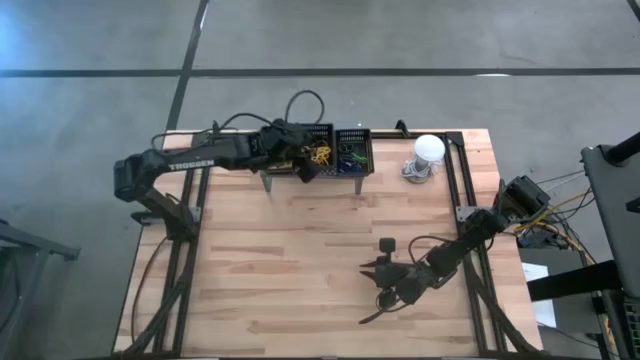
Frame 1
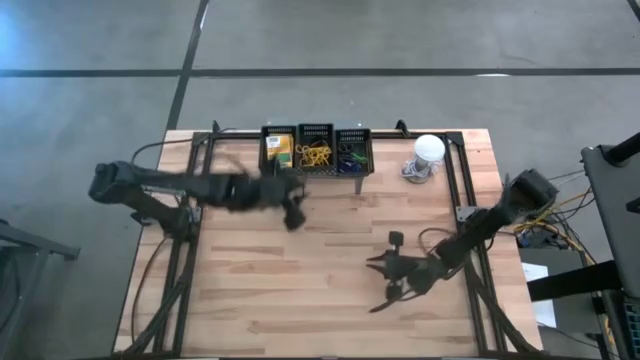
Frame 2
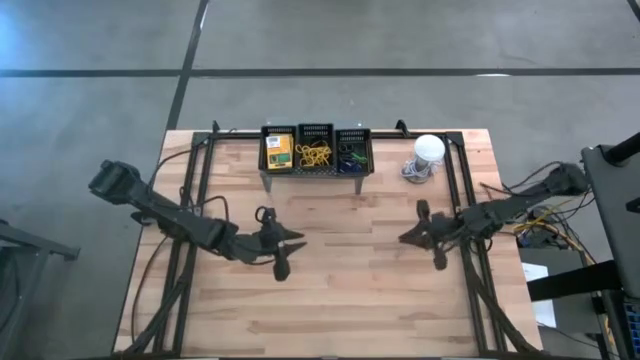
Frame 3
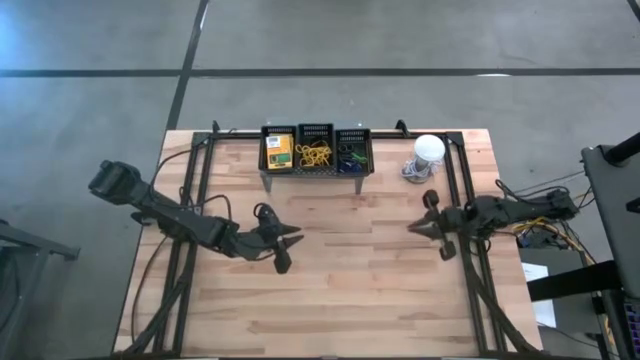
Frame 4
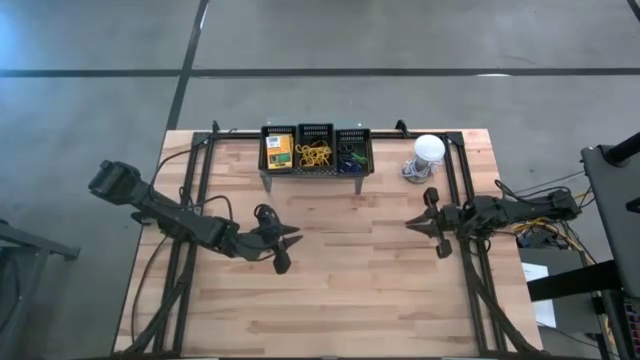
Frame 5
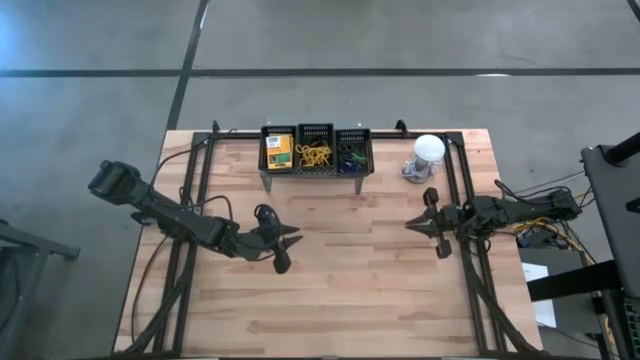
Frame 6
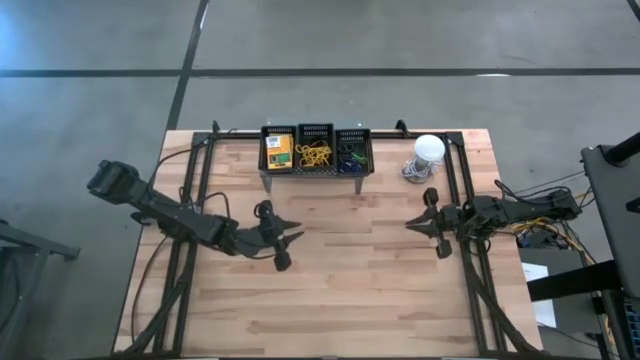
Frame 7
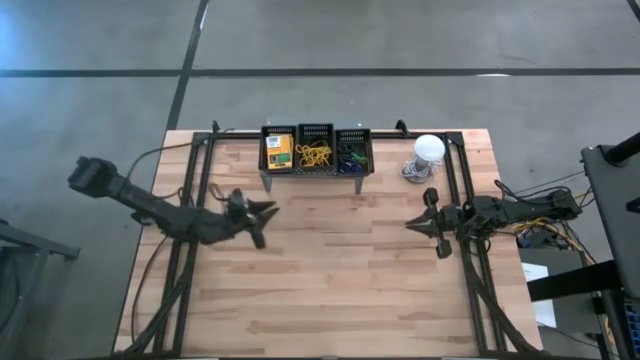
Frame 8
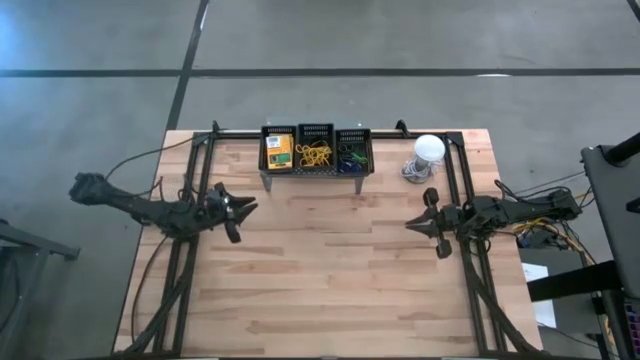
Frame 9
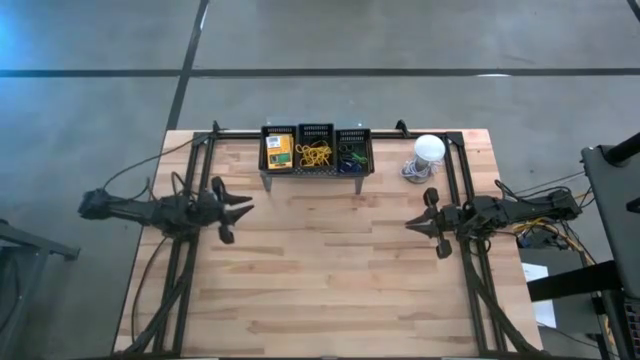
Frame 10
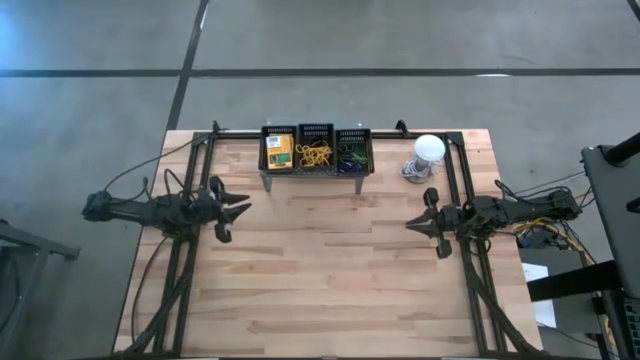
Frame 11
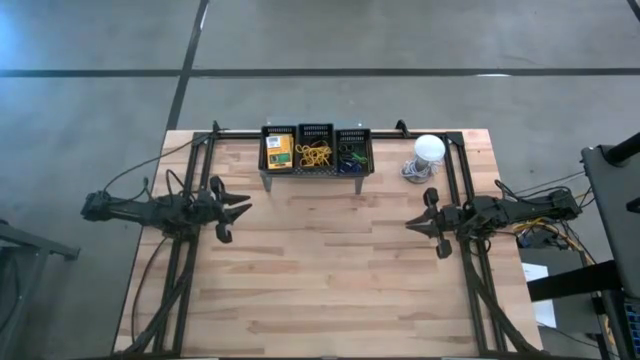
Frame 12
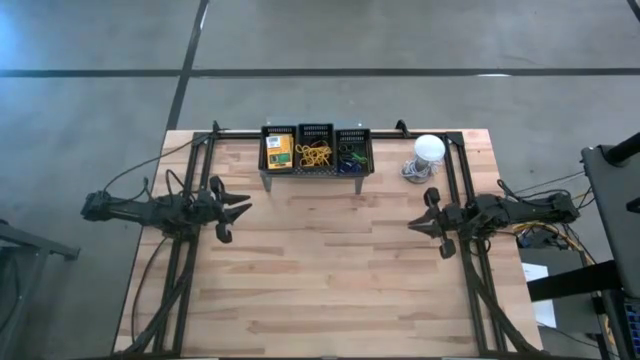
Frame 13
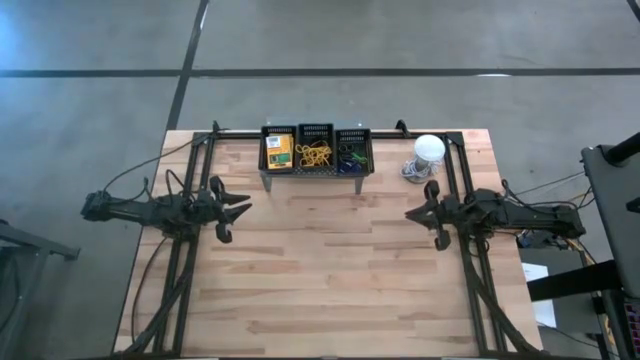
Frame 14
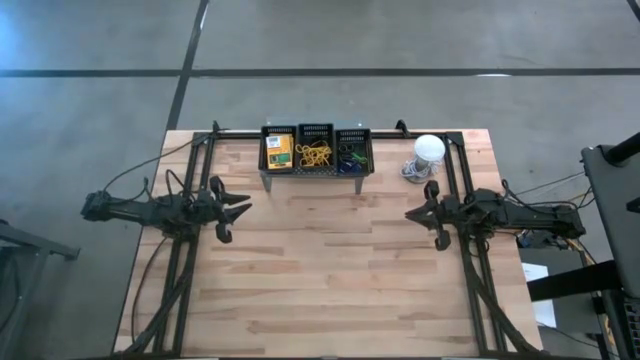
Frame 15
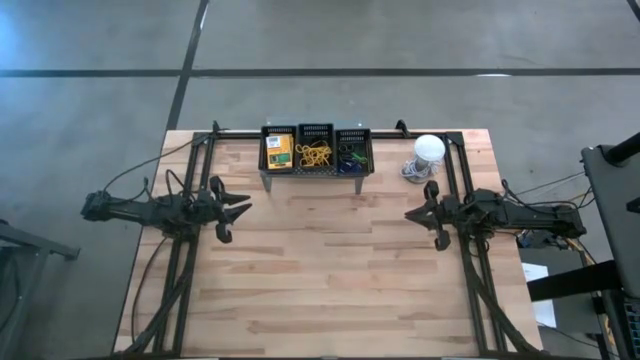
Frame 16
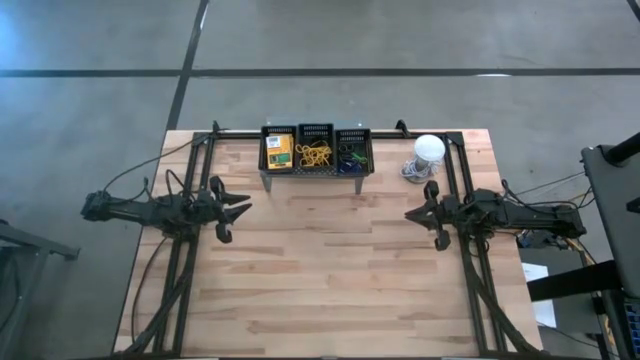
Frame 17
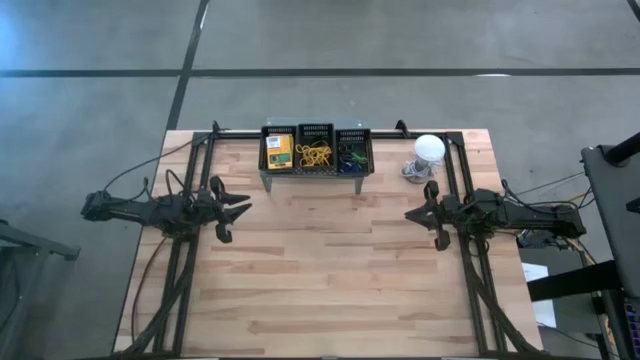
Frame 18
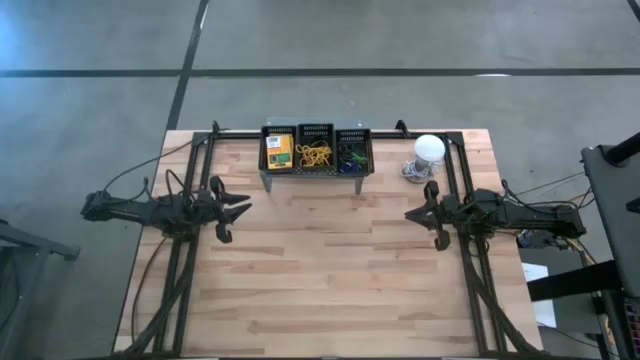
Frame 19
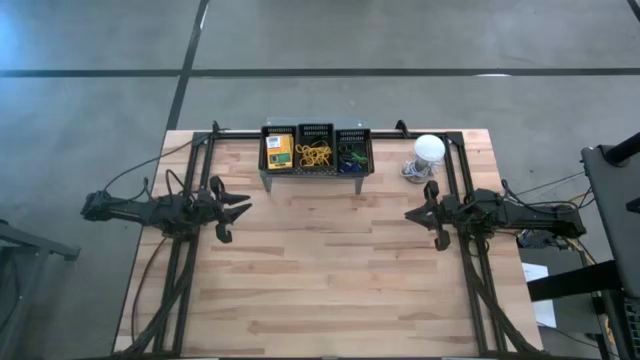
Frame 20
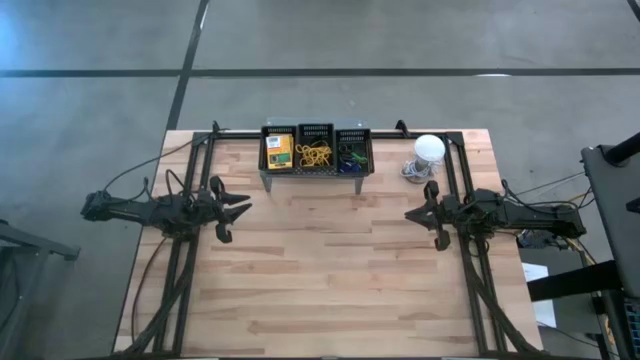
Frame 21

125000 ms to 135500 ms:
Task: Pick & Place Office Desk Supplies
Return to Home Position

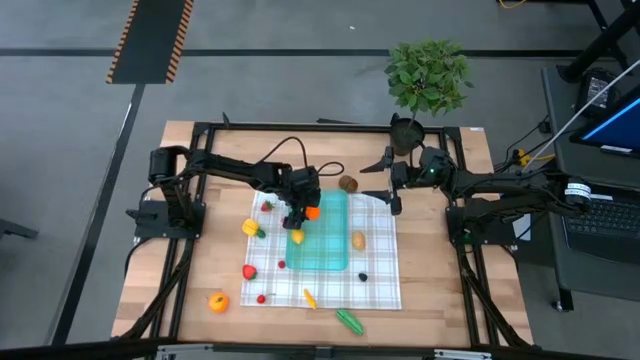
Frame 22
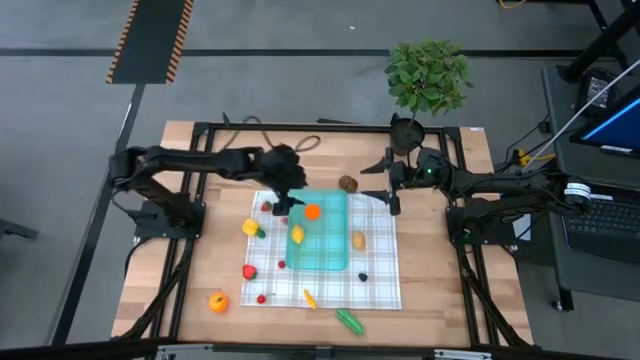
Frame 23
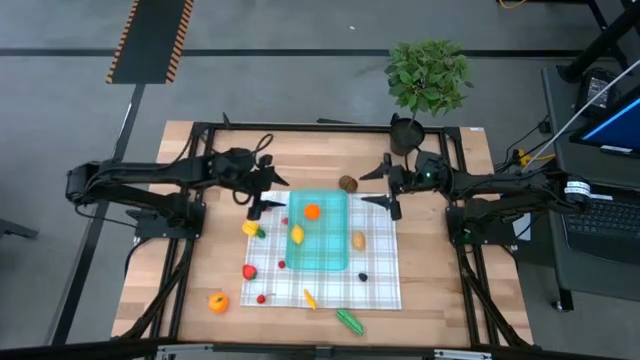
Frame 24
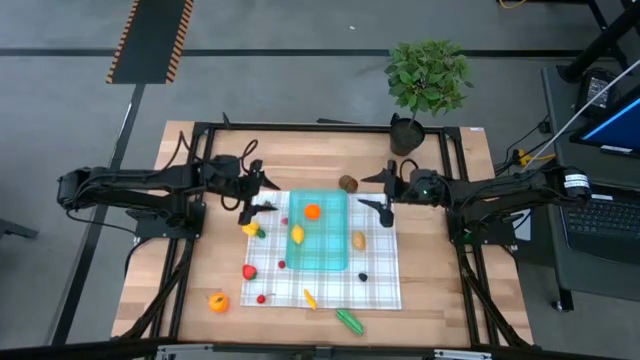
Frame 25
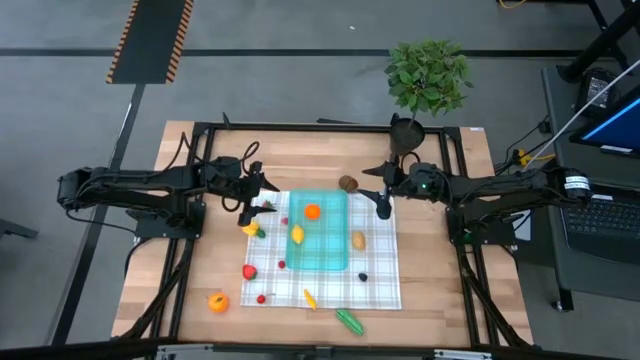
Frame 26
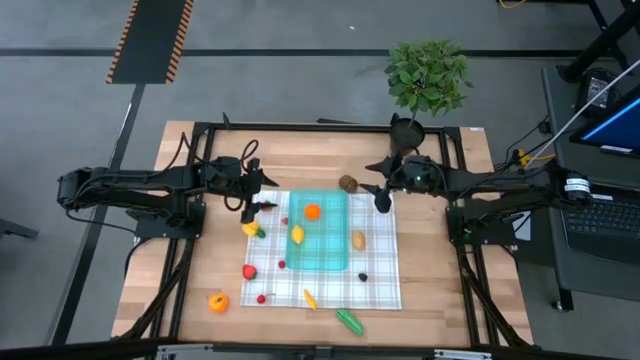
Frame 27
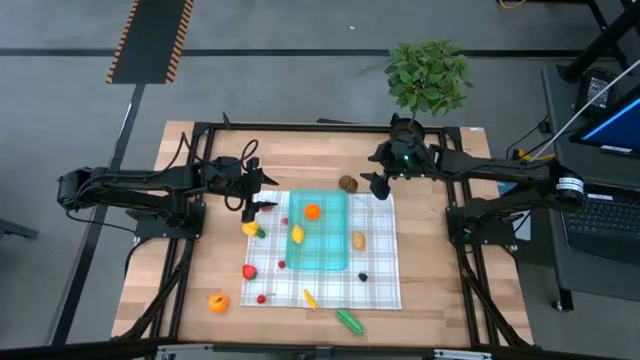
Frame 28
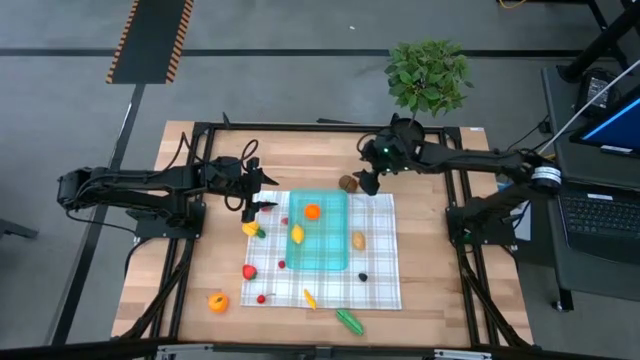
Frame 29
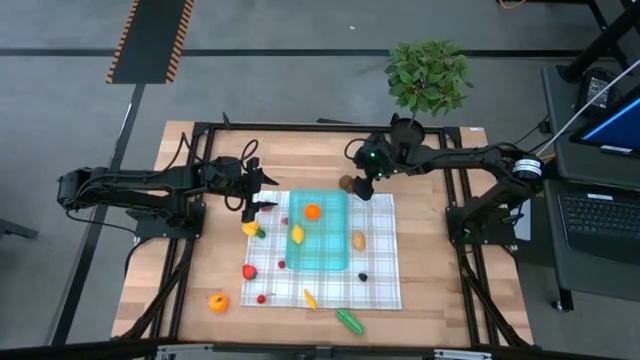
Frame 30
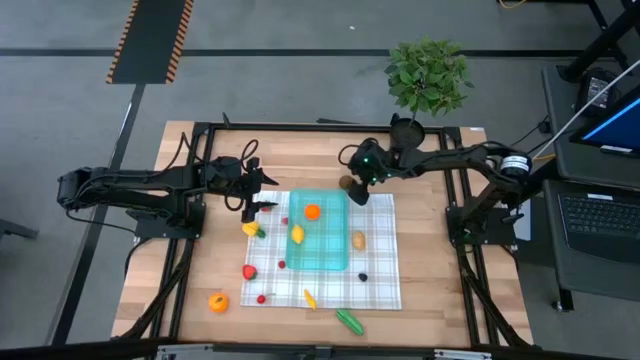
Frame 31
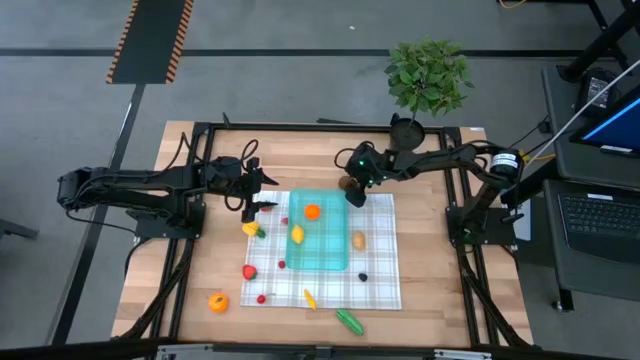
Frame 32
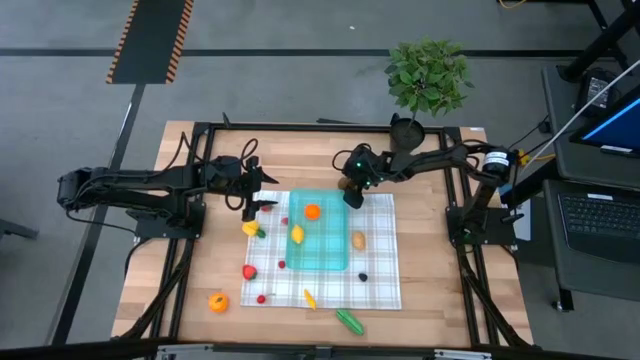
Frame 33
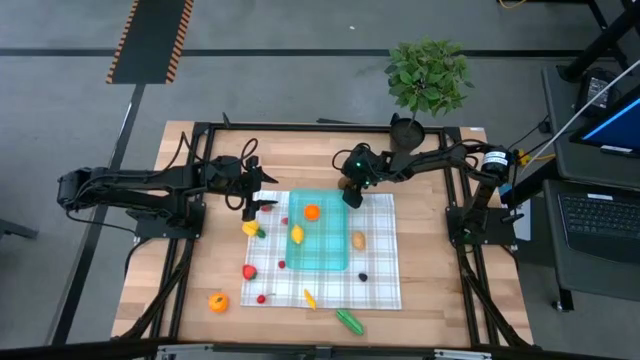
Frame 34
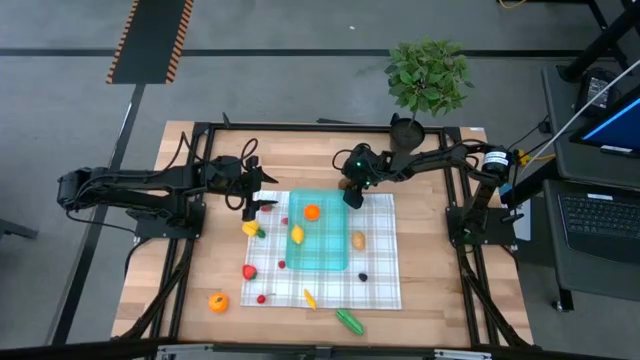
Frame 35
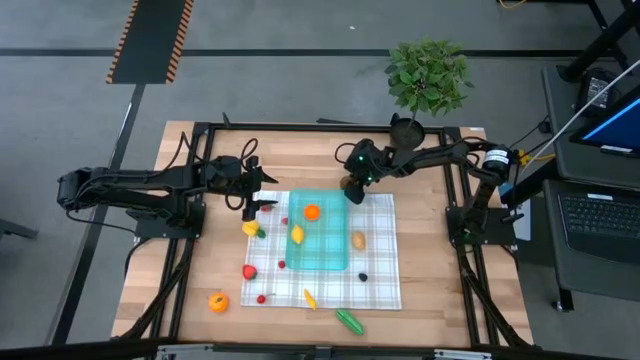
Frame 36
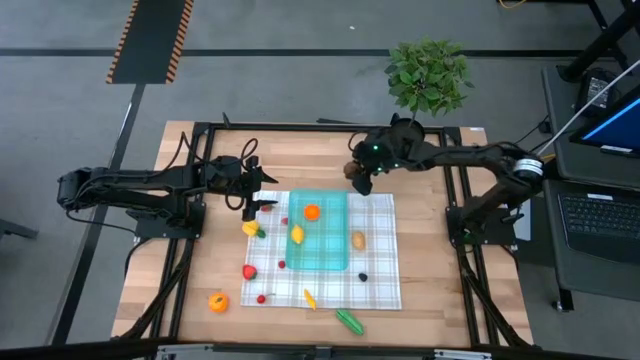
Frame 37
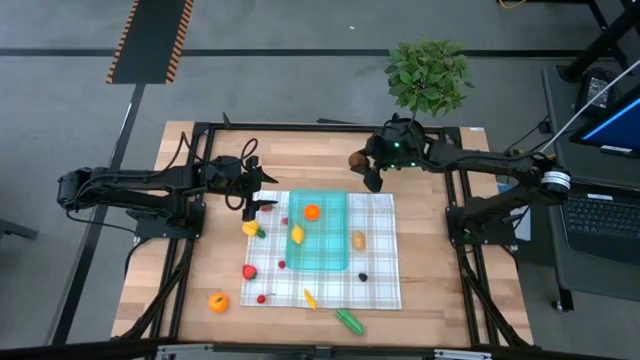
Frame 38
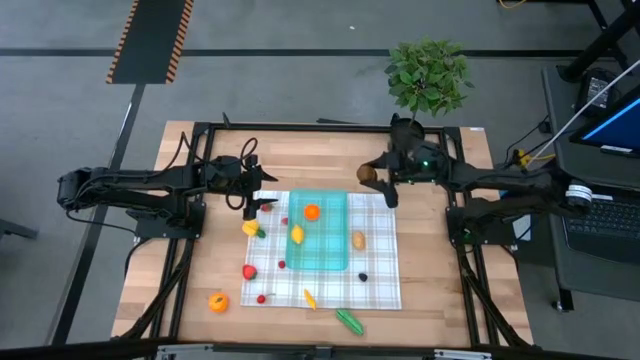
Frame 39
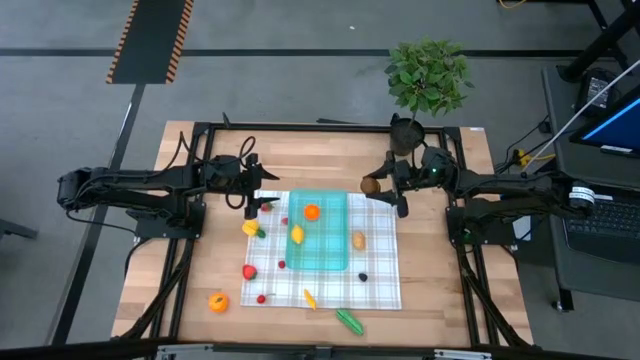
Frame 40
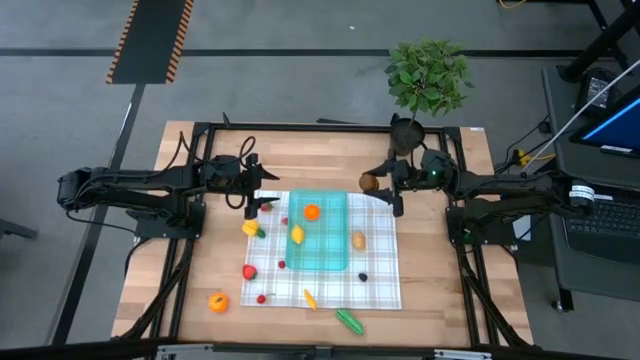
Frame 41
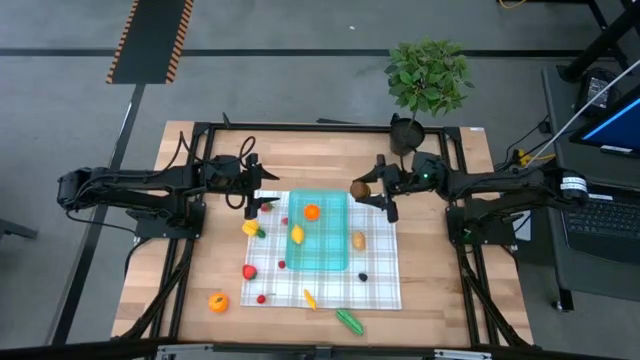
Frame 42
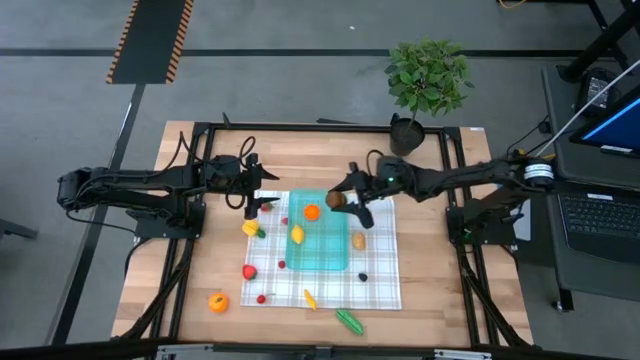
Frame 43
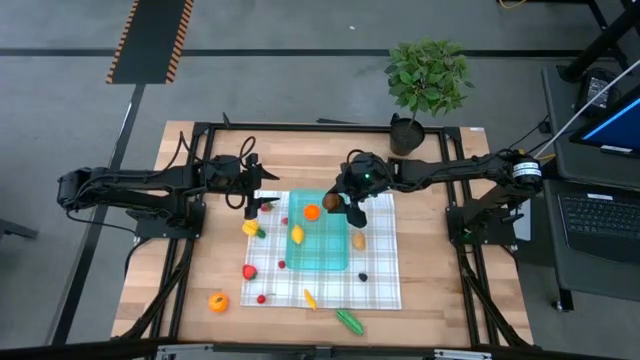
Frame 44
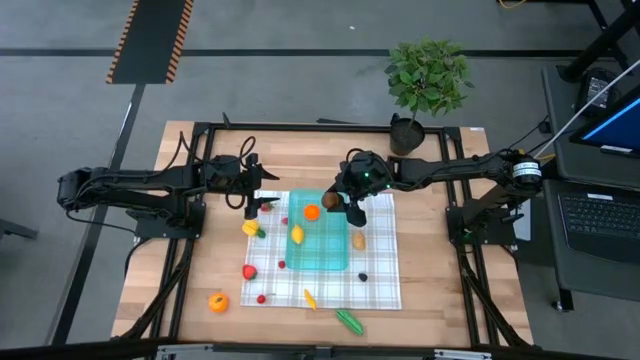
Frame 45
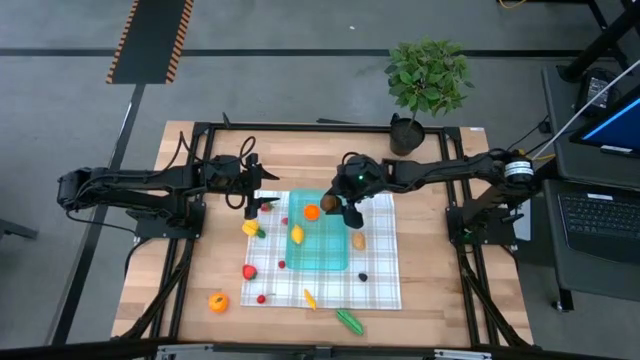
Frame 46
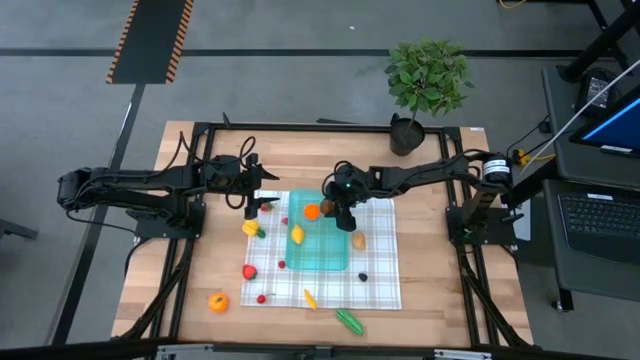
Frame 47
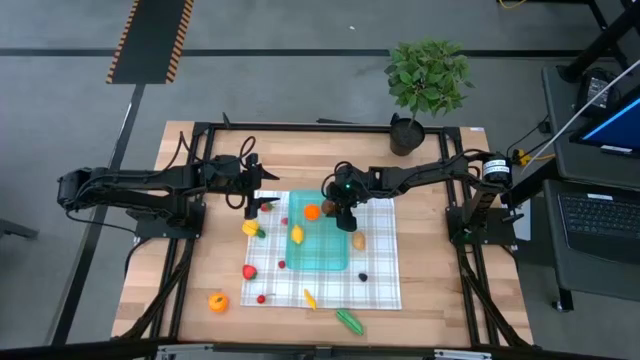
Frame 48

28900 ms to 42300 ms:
Task: Pick and placing Produce into tupperware
Put the brown kiwi into the blue bin
